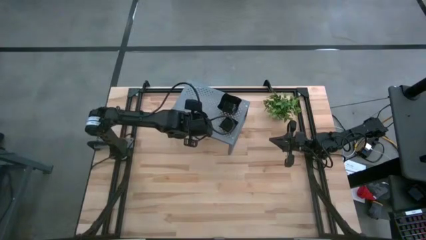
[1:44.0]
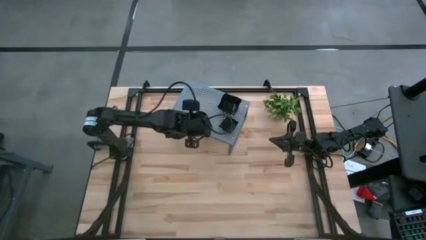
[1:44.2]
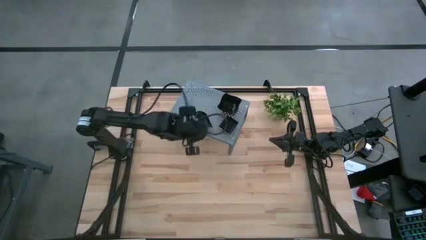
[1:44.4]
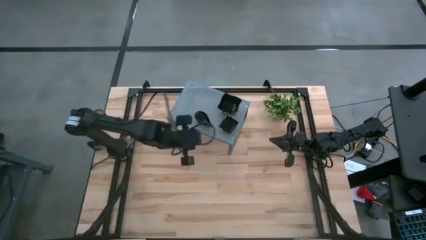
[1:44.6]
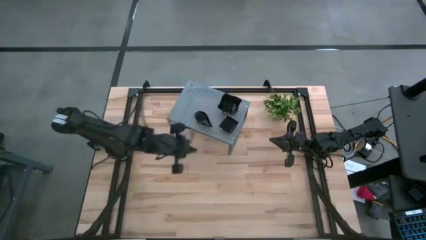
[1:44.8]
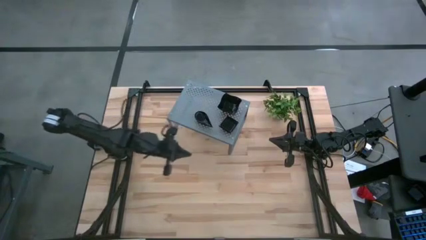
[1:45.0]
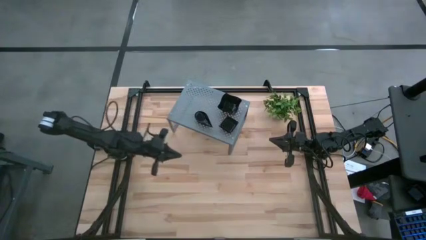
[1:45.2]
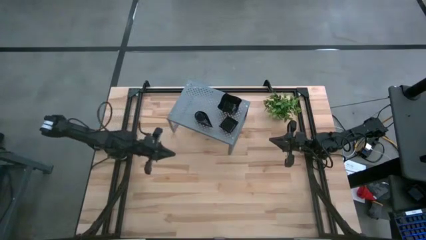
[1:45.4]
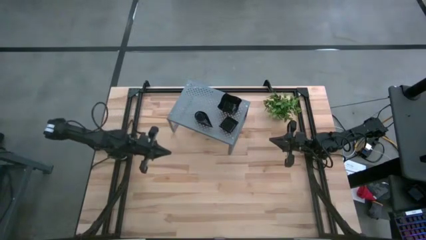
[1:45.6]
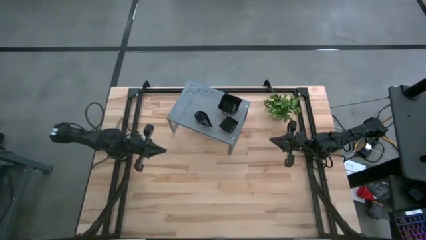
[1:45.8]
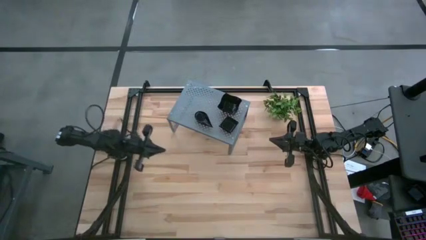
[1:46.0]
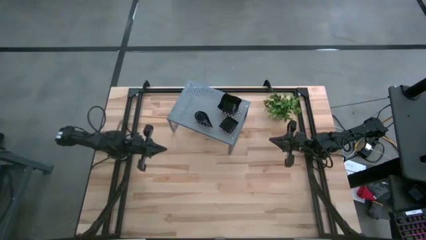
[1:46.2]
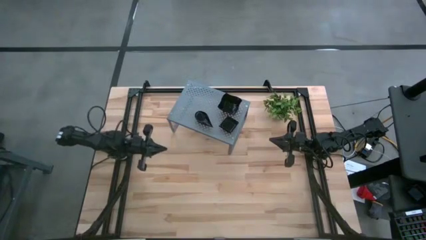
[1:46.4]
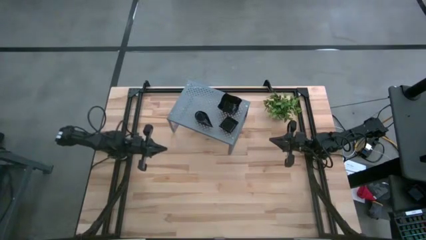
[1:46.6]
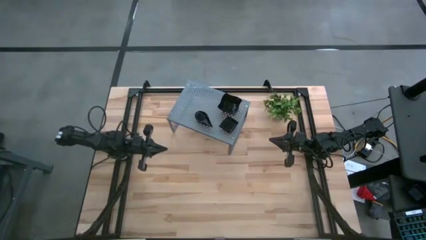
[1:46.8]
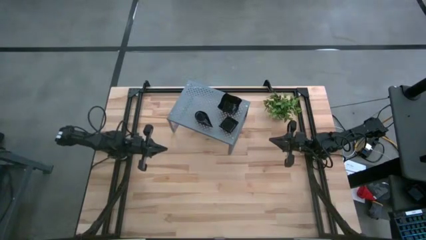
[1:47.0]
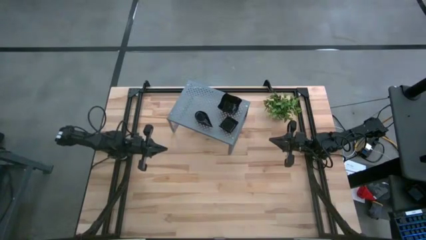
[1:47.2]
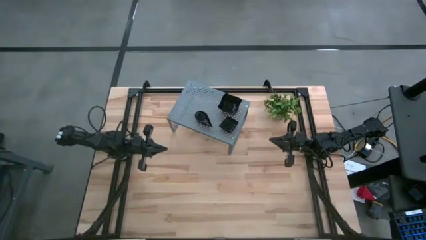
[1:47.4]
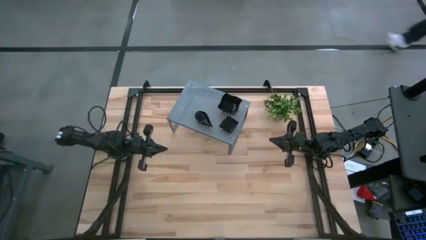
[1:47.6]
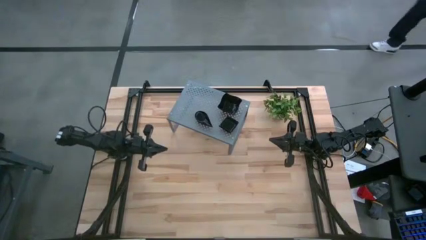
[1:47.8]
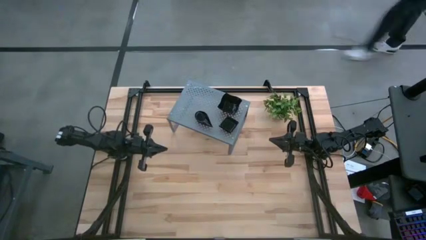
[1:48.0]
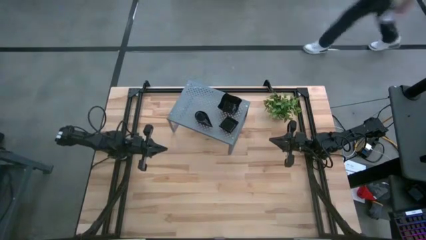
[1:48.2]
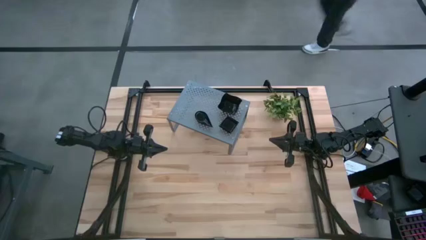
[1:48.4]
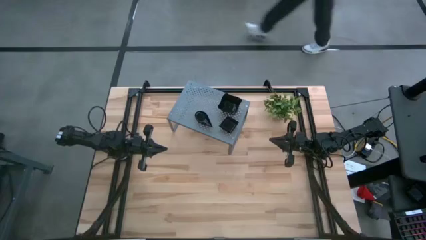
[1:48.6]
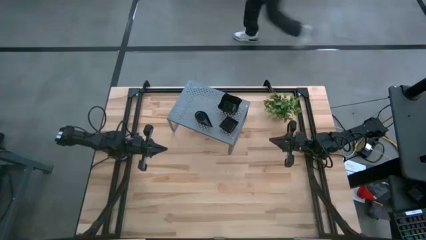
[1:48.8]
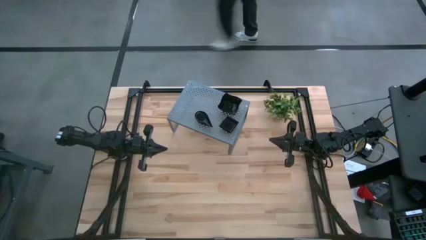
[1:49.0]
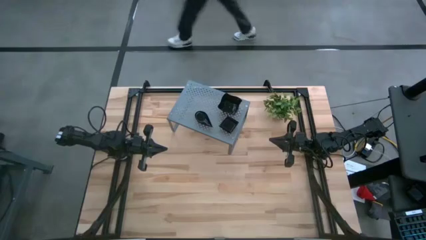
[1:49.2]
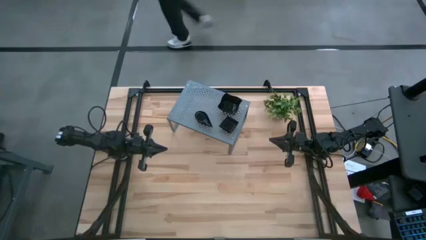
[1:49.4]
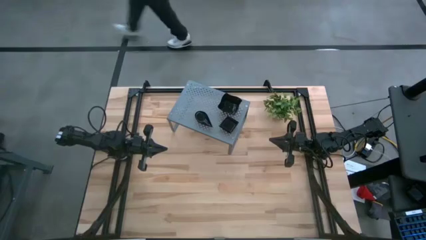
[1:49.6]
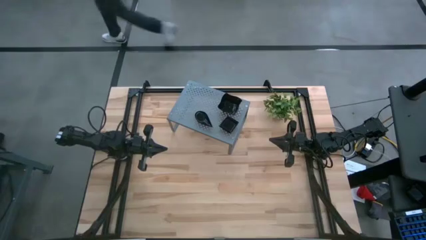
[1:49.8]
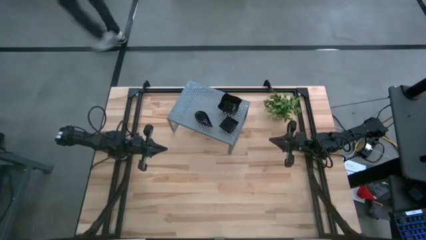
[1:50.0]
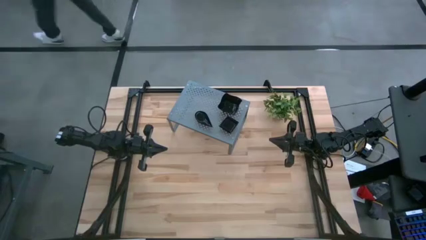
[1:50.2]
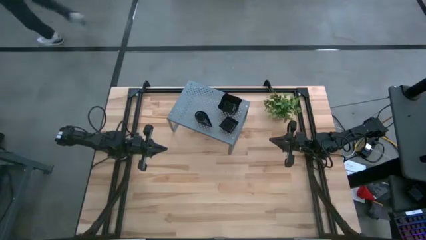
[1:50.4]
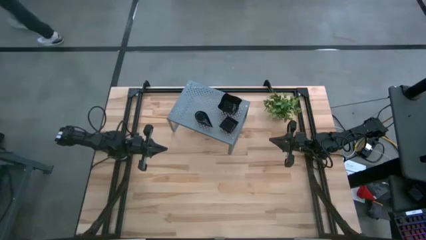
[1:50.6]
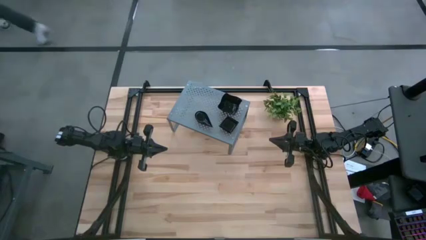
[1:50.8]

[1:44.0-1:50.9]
Task: Pick & Place Mini shaped plates
Return to Home Position

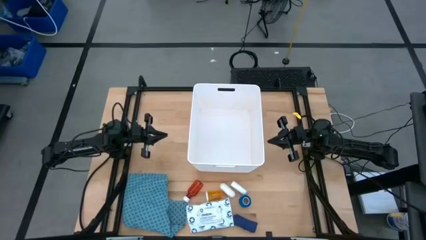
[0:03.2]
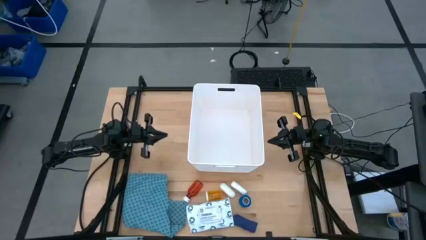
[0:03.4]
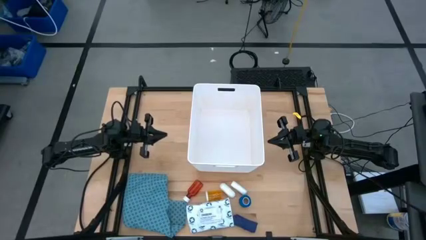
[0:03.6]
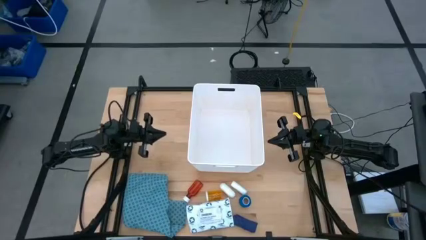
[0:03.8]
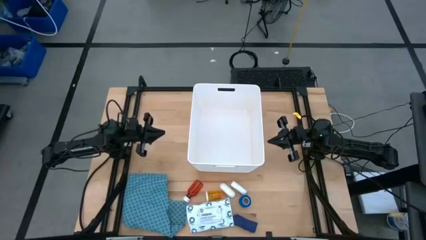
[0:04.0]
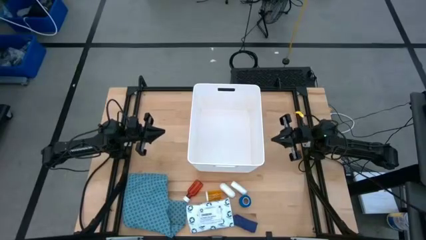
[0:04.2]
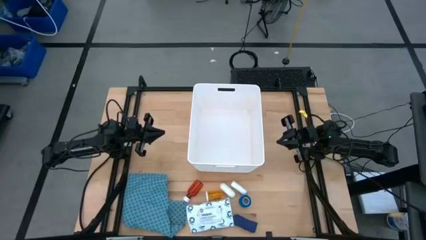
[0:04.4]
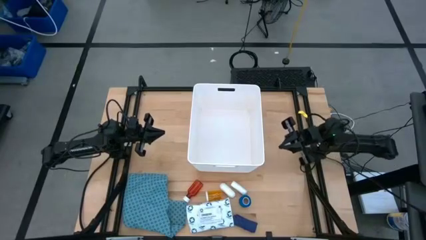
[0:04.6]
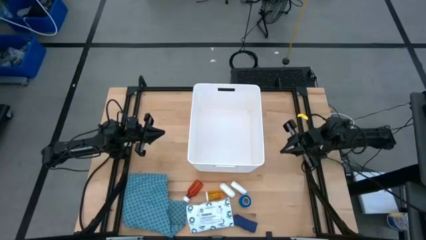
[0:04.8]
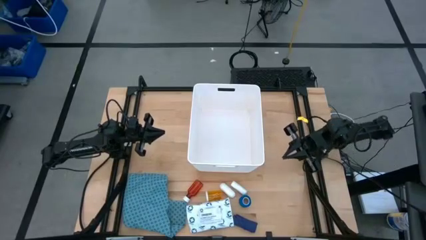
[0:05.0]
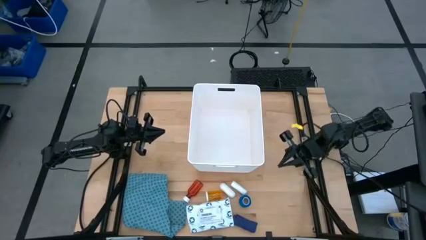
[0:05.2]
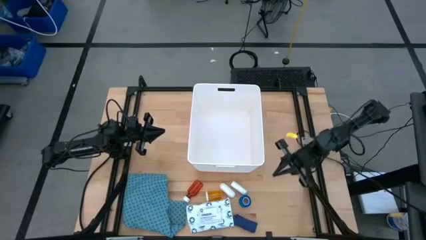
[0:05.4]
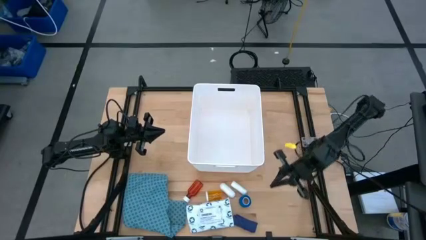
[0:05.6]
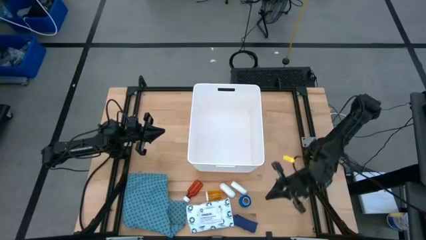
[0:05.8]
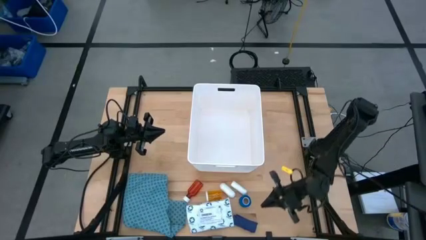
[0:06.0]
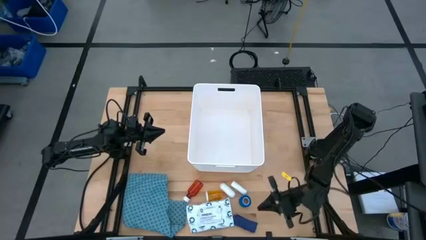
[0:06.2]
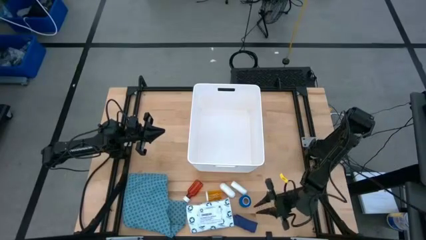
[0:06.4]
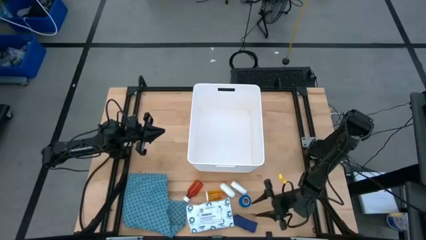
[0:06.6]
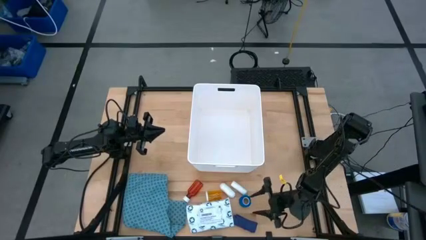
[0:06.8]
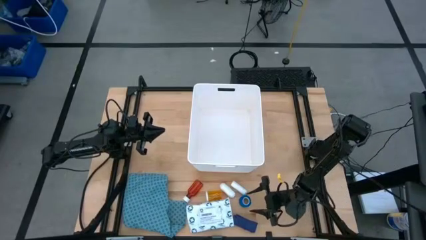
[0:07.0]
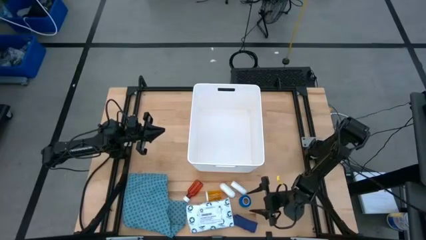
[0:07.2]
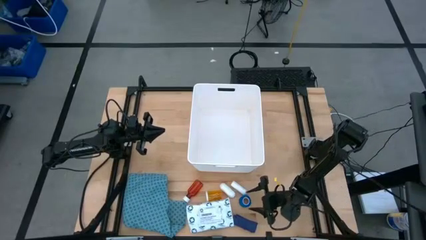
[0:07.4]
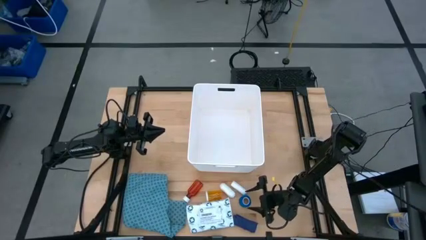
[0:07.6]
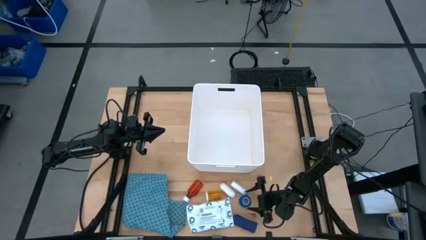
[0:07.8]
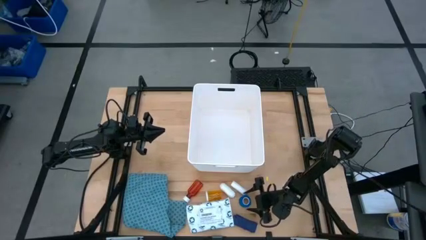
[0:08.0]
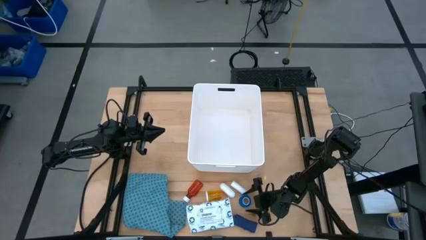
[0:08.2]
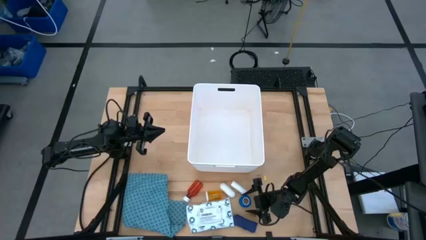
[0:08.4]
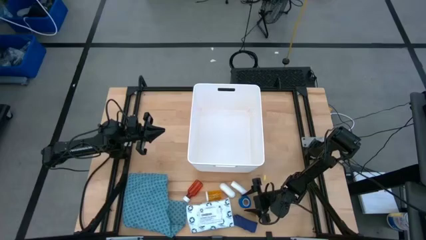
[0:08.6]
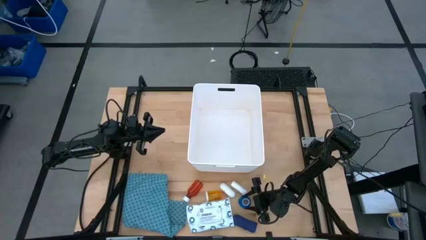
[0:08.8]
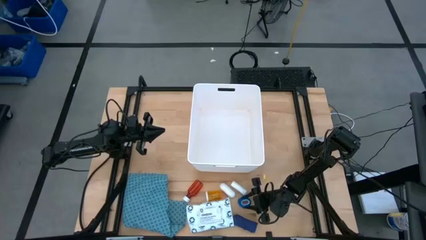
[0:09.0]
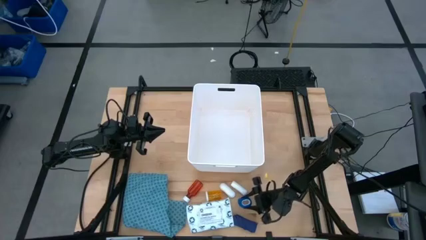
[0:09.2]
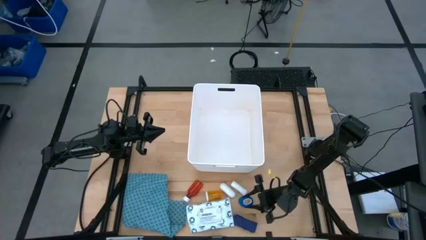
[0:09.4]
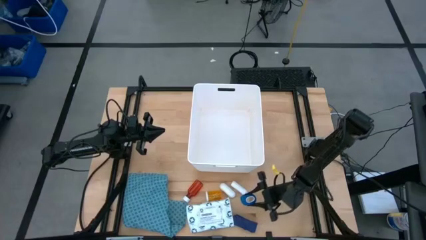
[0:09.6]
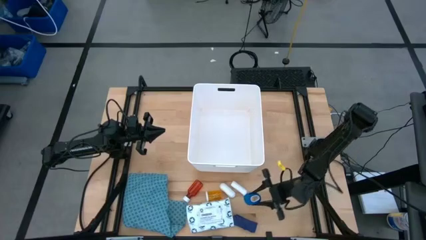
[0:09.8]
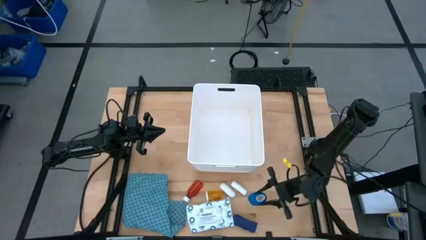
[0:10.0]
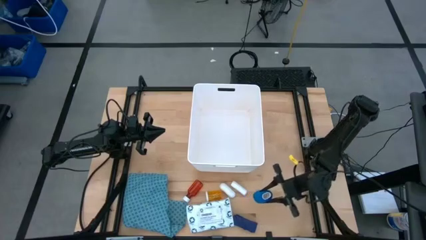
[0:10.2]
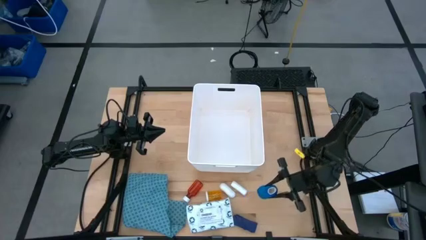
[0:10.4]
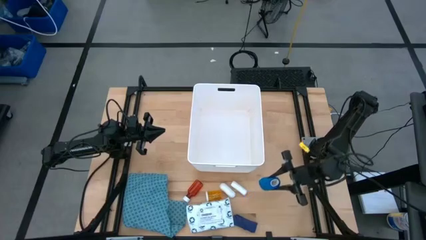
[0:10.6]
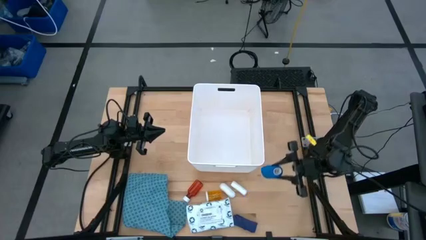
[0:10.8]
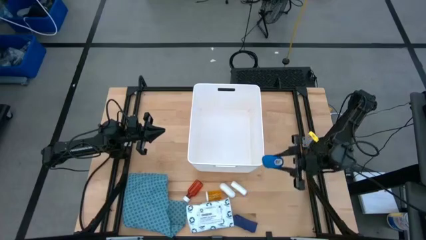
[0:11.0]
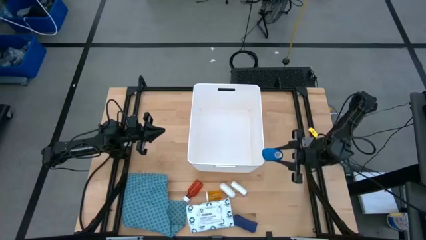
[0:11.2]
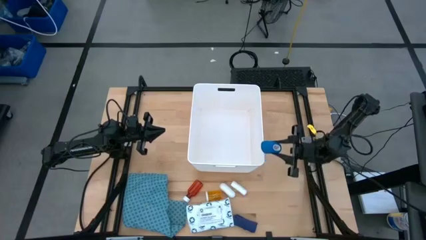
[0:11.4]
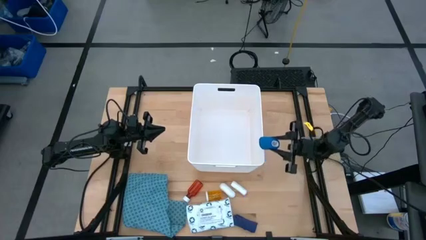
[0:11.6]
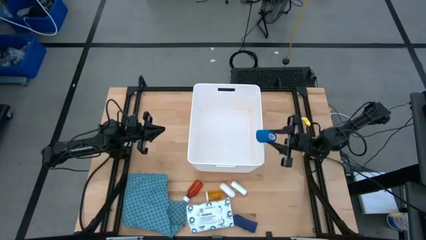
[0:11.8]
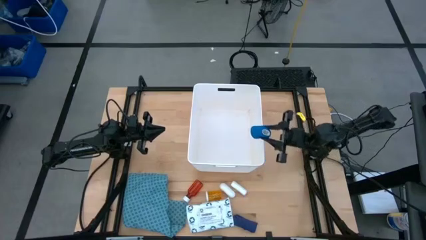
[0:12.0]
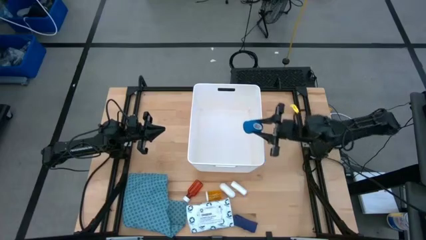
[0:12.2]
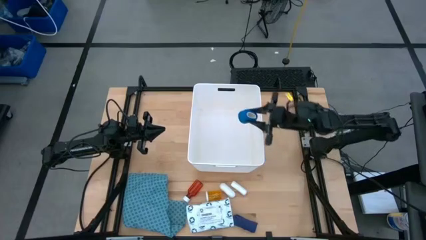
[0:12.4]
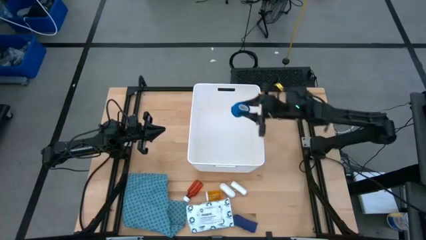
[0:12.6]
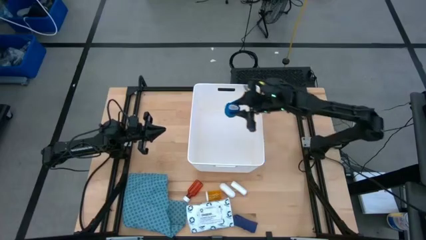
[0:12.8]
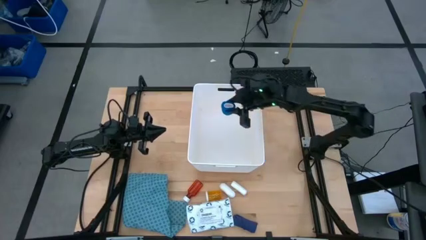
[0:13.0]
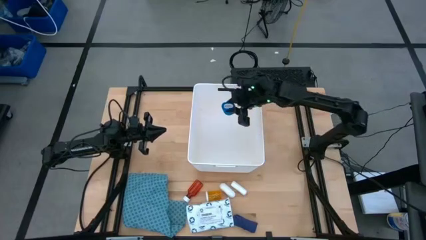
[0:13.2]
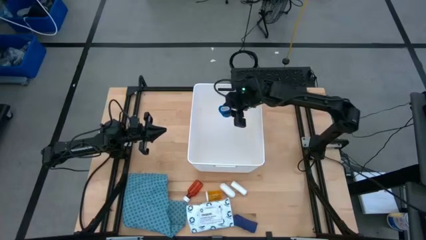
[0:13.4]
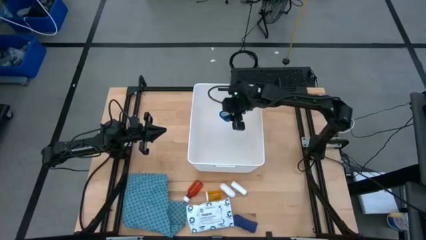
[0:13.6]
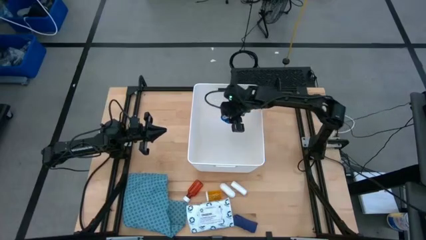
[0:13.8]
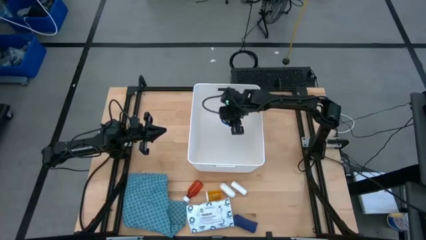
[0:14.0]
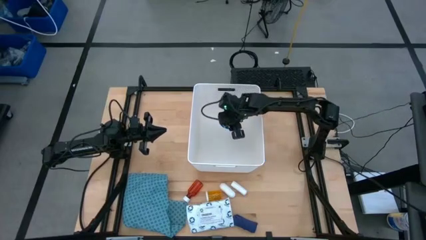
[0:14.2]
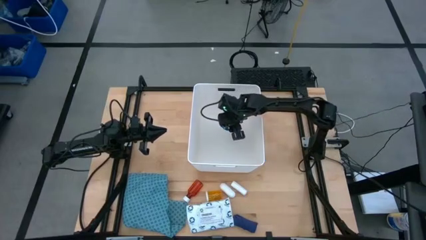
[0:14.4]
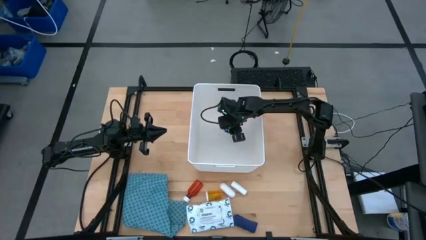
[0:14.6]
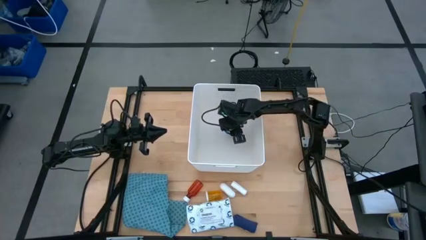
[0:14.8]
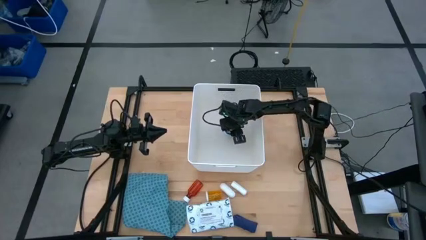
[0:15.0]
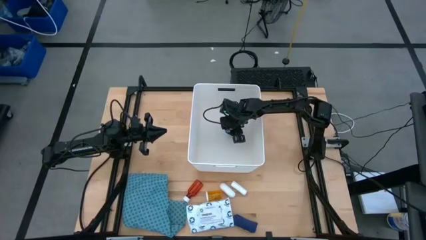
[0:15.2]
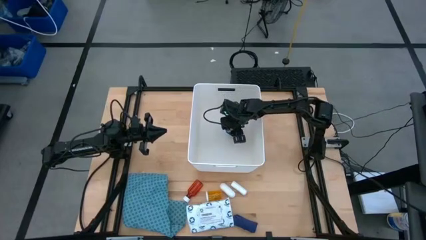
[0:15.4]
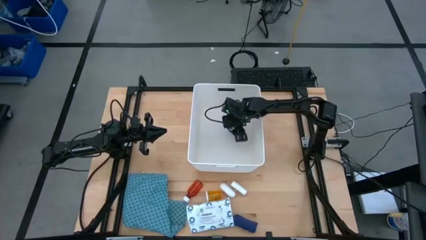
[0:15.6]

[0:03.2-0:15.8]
Task: Pick & place medical supplies in basket/bin
Put the small blue bandage into the white bin
